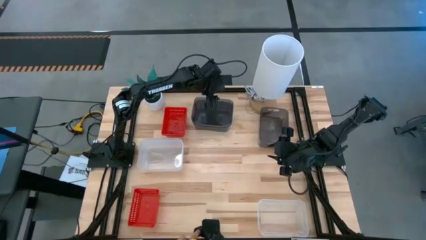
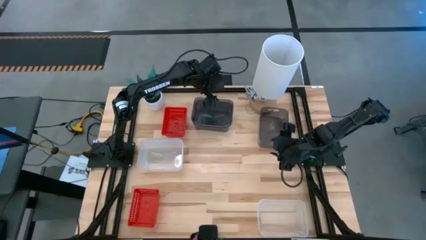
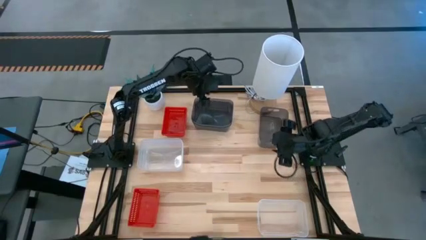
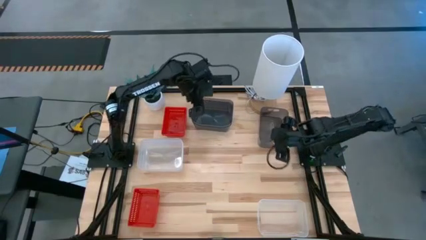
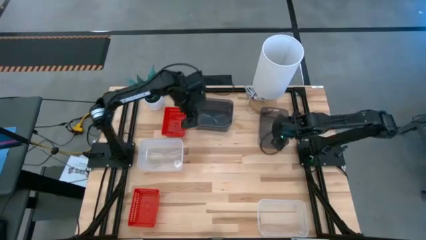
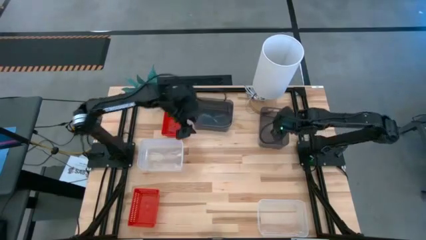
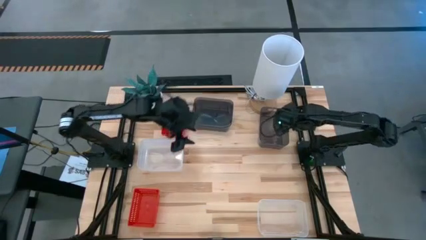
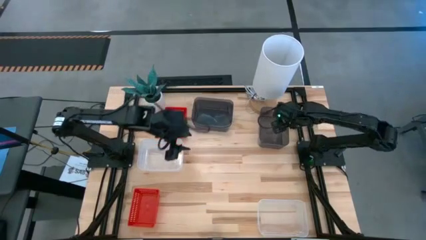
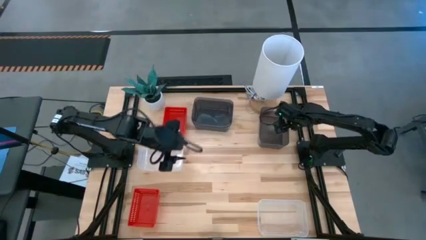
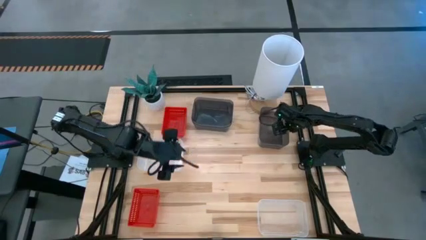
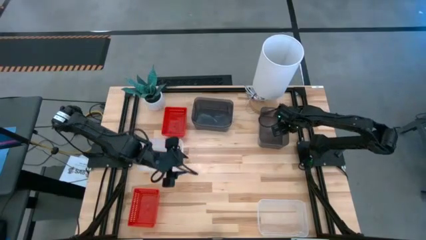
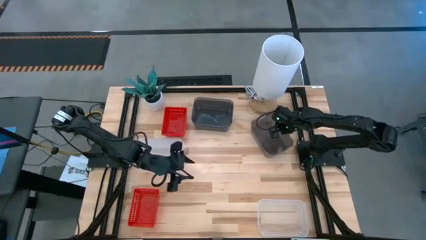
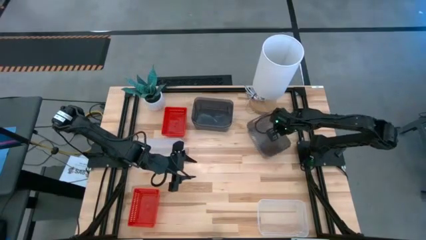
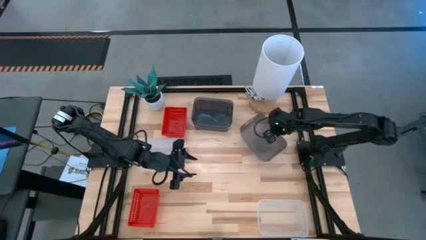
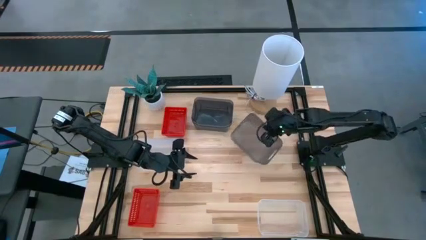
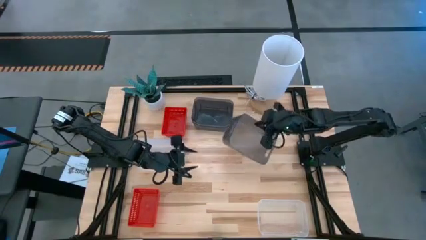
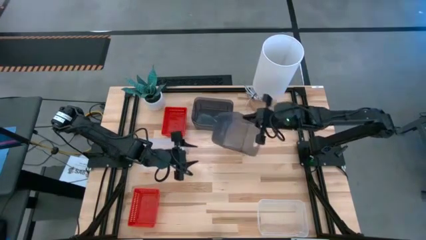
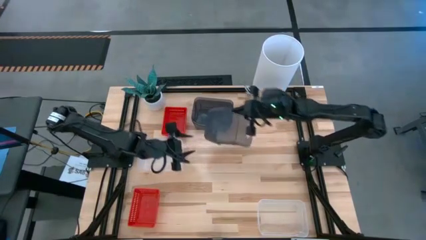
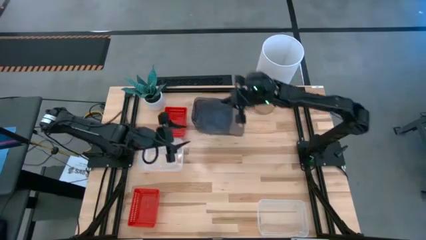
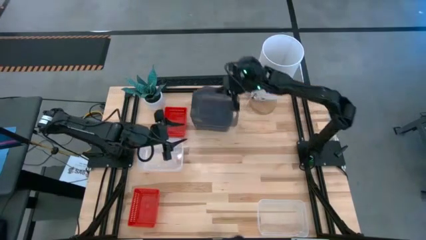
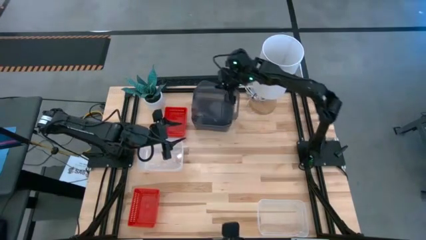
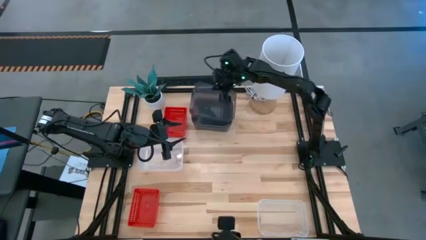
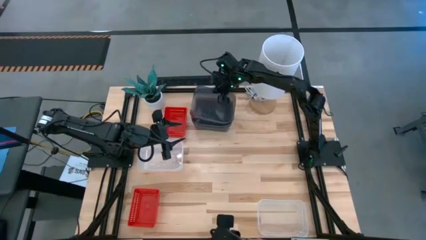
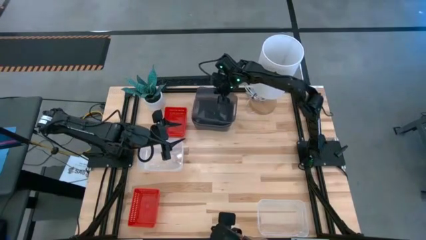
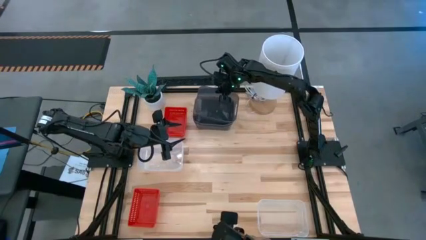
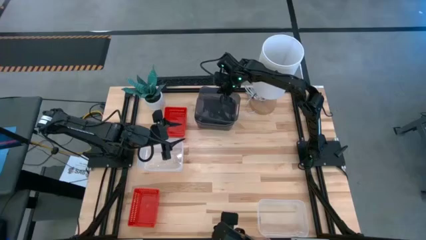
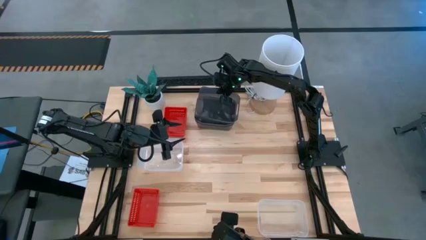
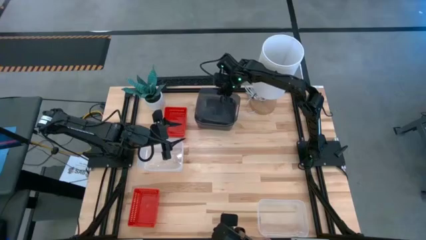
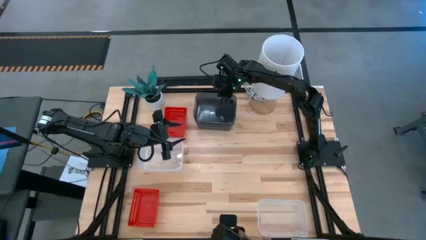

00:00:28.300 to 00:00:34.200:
Stack the right black bin on the top black bin

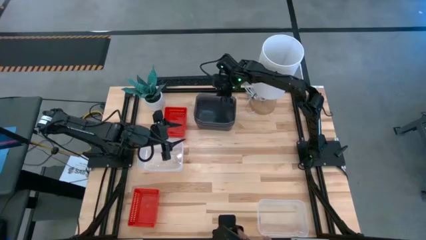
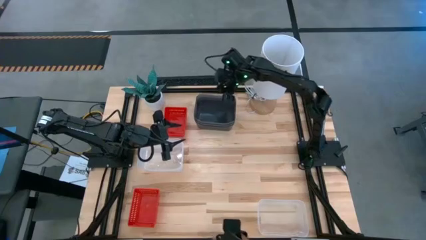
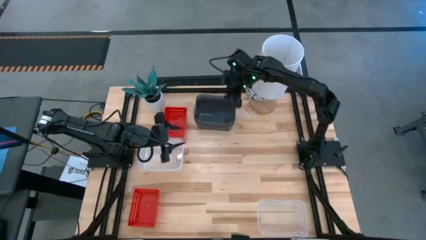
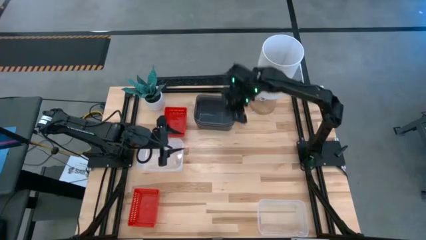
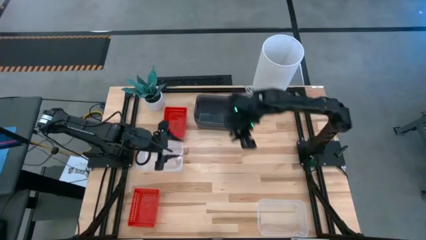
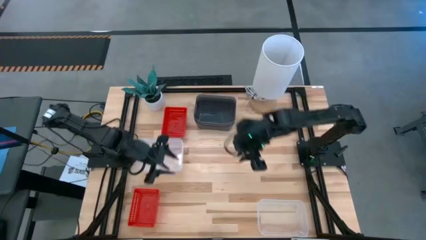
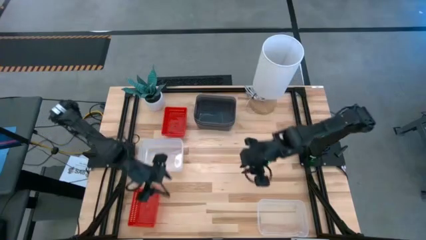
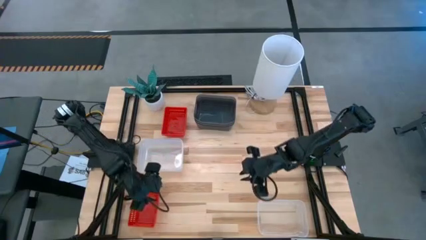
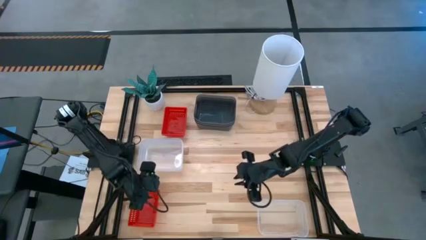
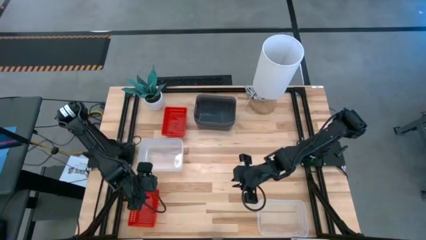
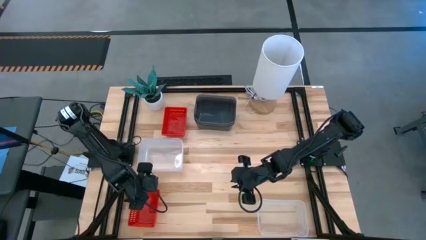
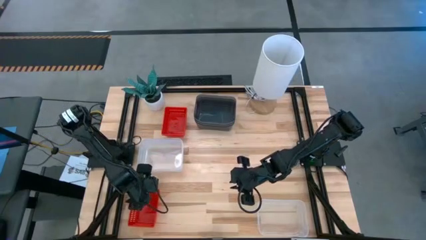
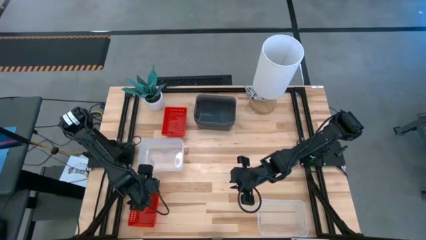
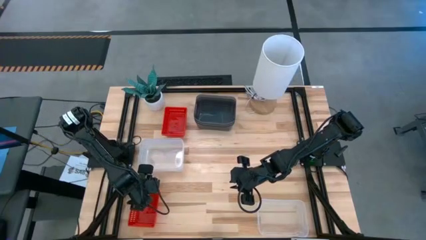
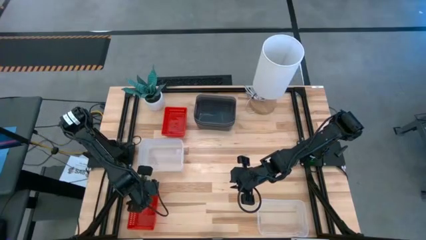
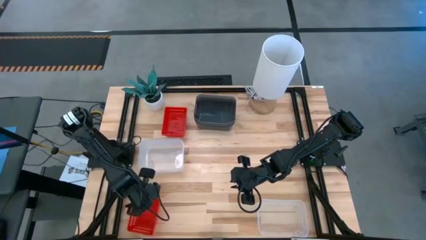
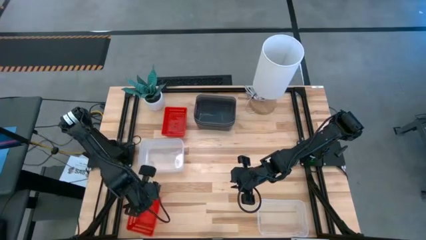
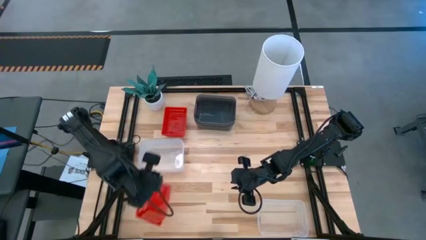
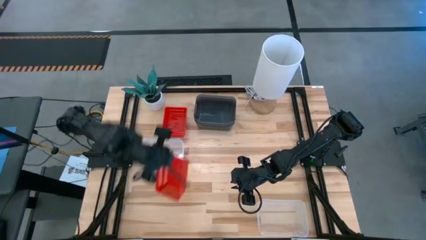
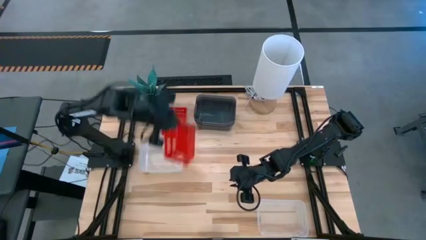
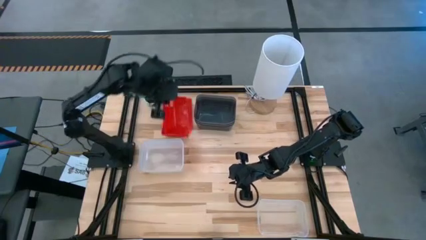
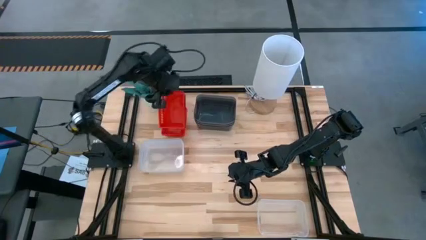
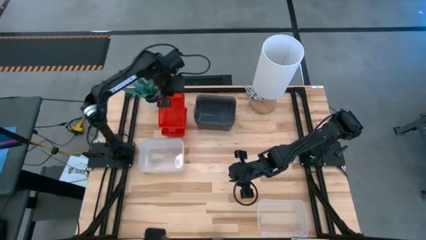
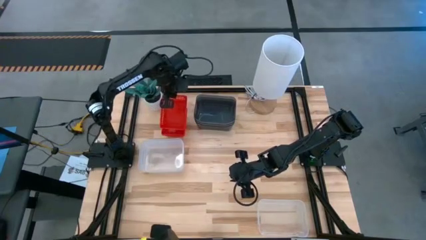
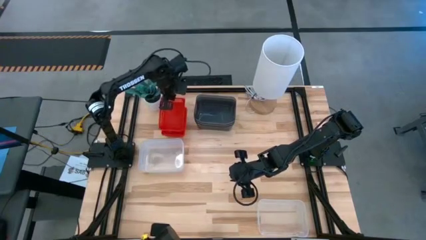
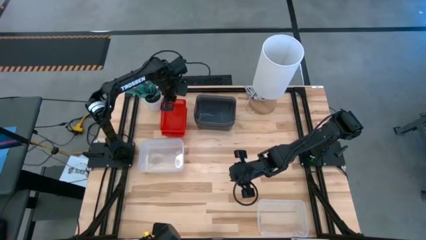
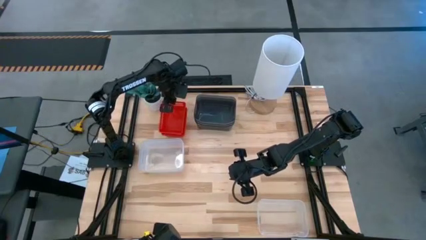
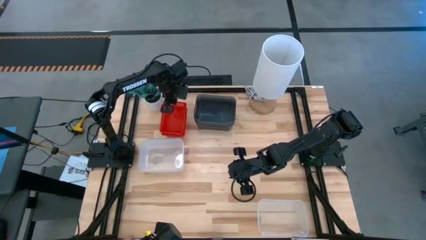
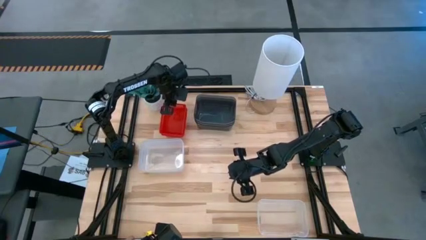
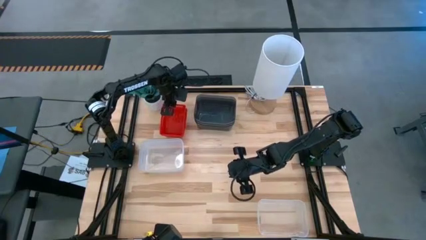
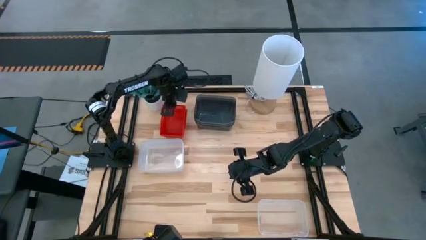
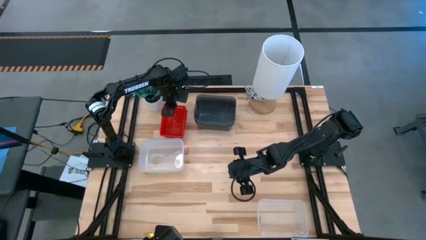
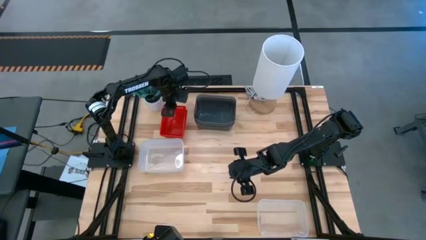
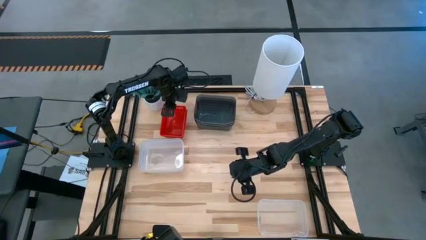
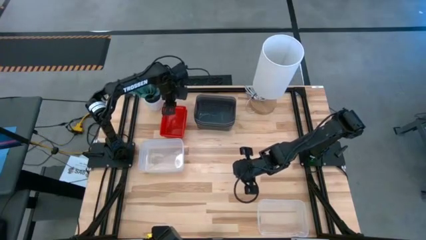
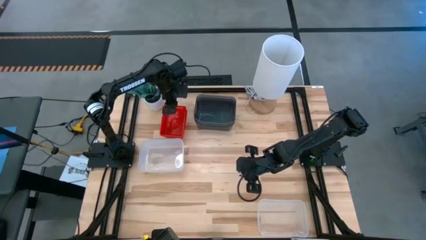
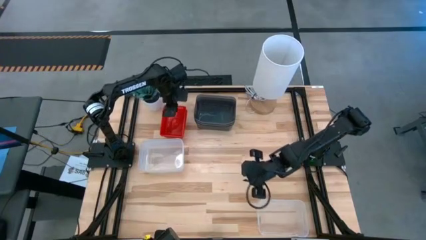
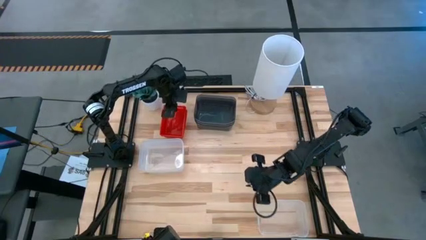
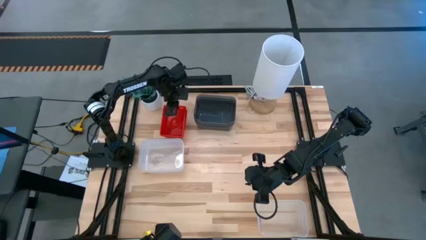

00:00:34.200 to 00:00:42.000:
Stack the bottom red bin on the top red bin

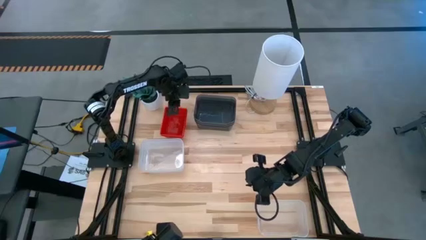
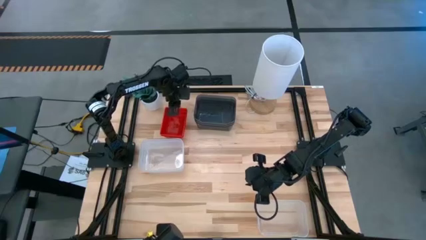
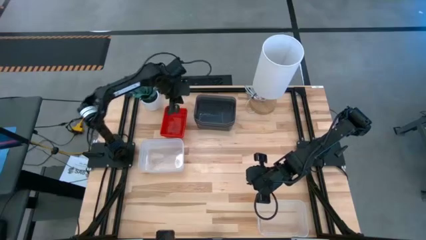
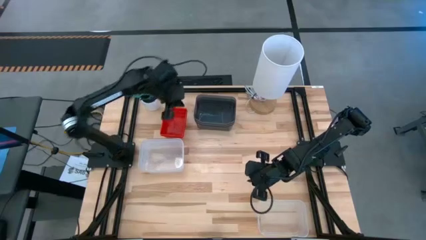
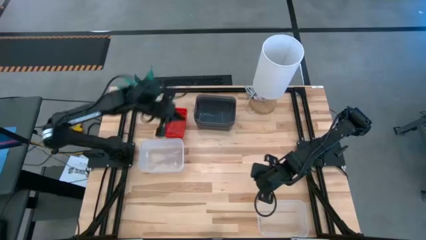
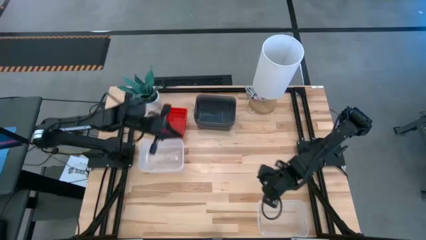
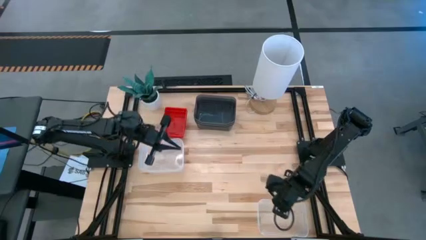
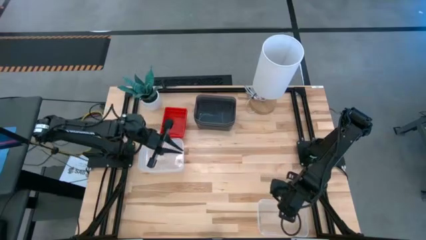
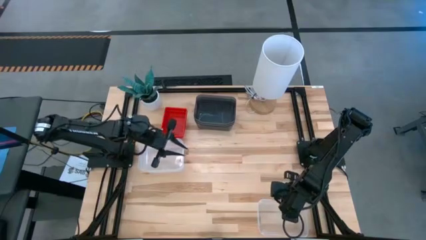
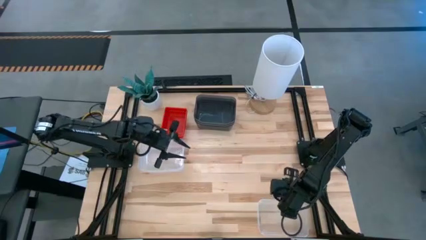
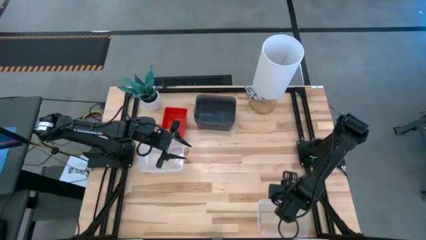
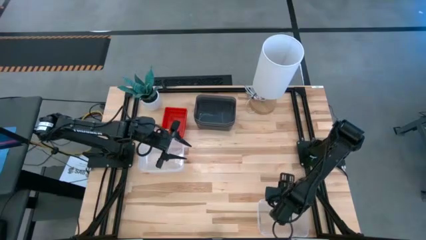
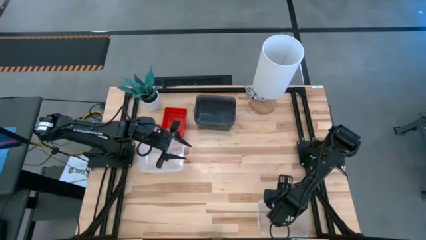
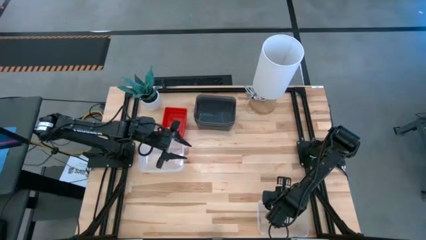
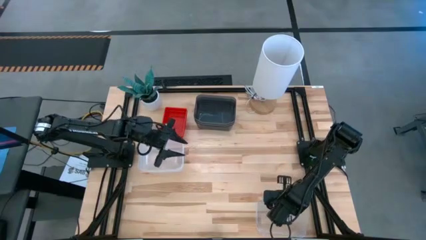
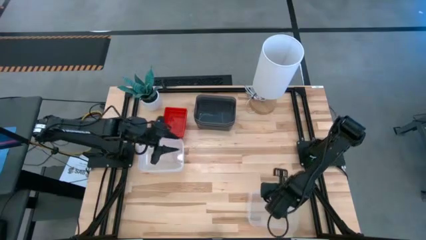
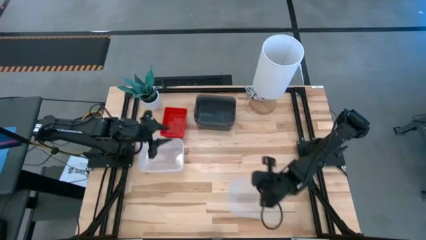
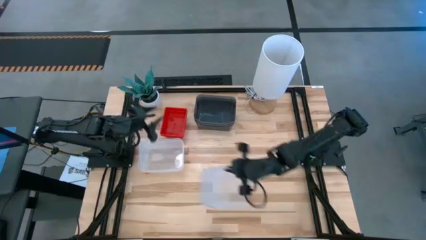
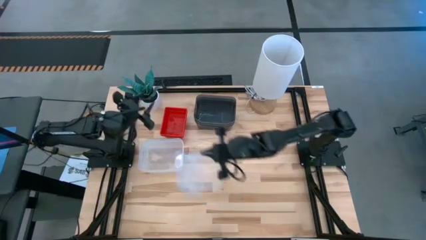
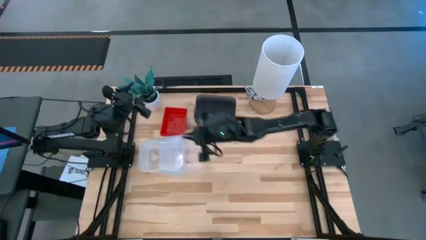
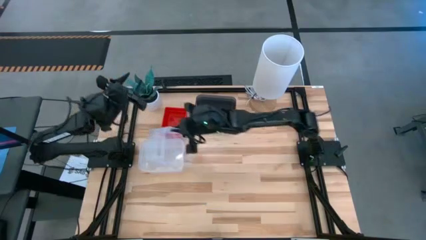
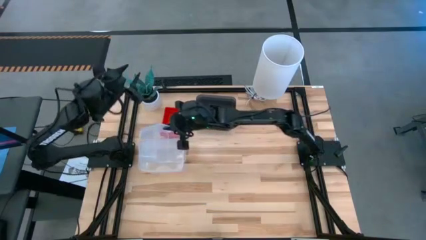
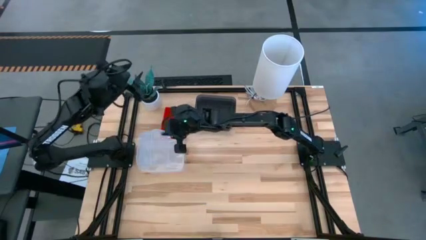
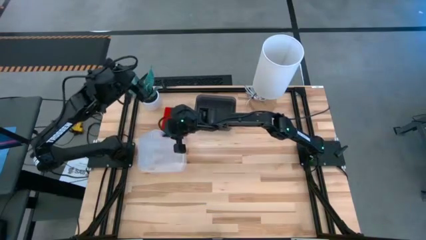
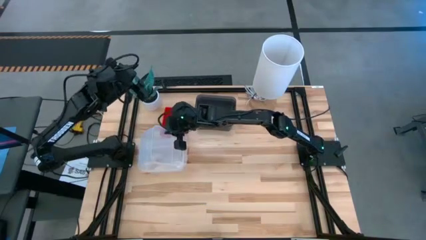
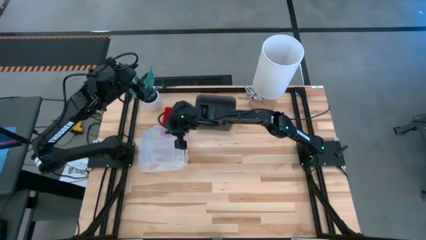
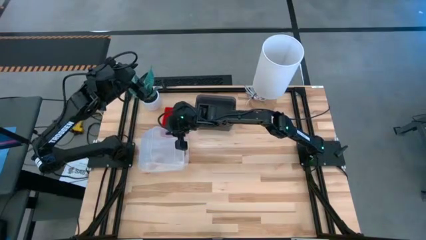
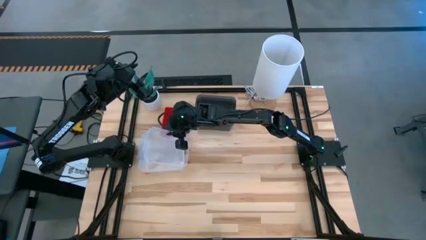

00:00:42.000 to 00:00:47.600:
Stack the bottom transparent bin on the top transparent bin
